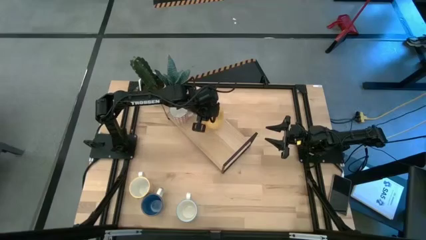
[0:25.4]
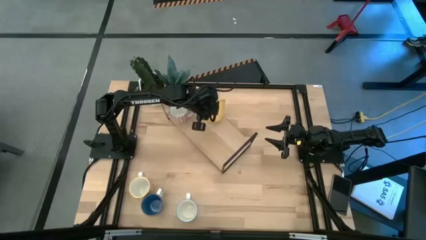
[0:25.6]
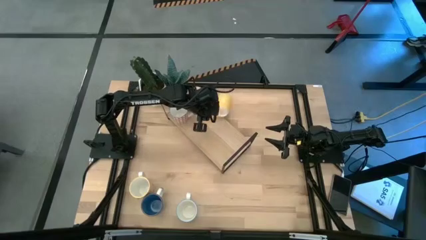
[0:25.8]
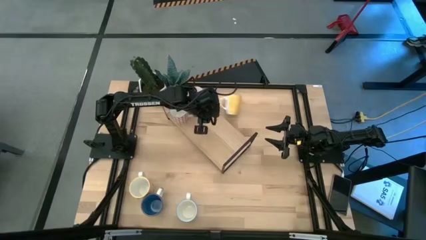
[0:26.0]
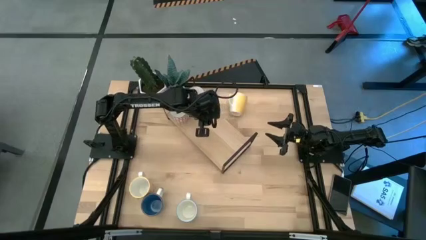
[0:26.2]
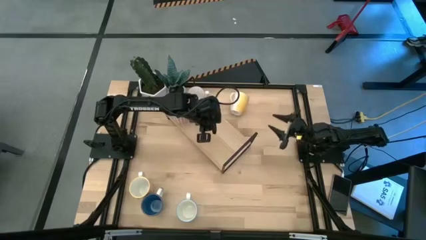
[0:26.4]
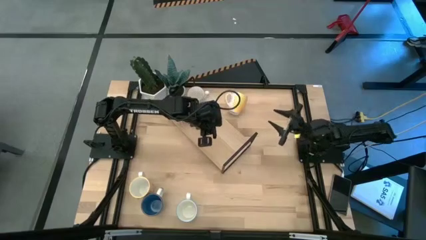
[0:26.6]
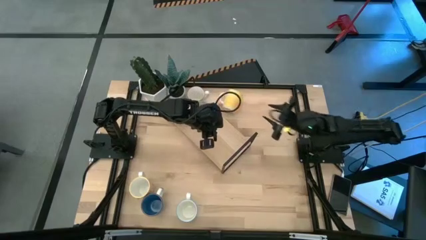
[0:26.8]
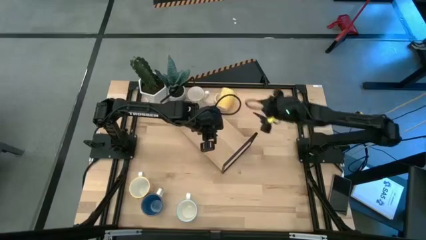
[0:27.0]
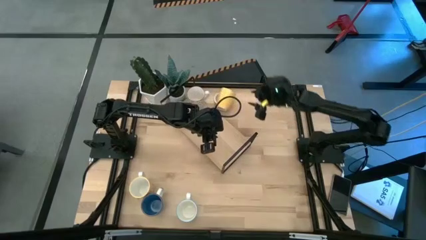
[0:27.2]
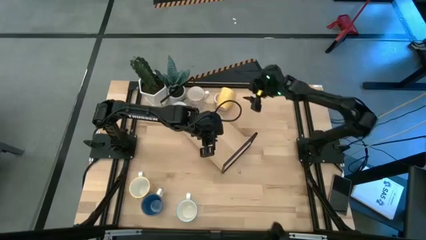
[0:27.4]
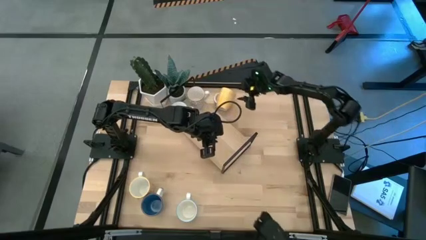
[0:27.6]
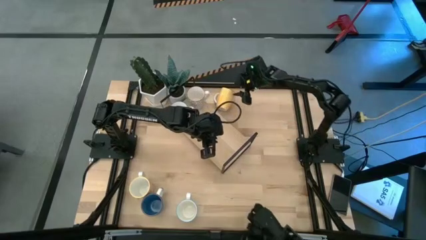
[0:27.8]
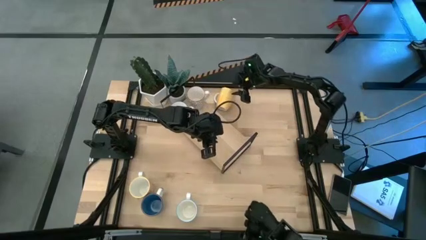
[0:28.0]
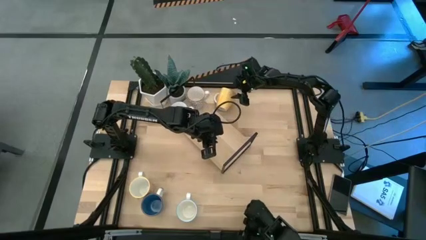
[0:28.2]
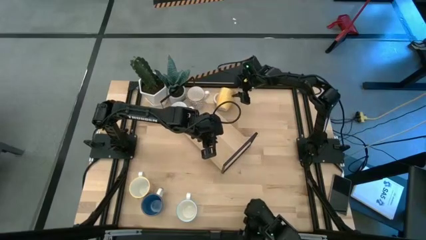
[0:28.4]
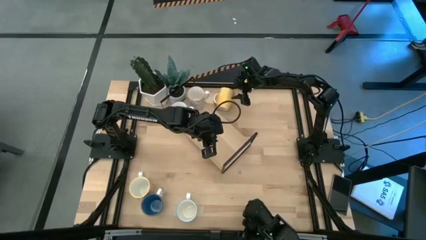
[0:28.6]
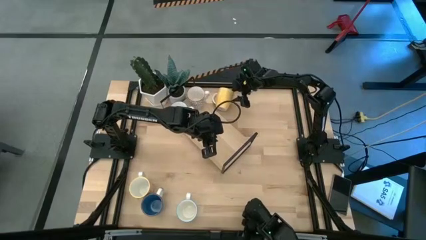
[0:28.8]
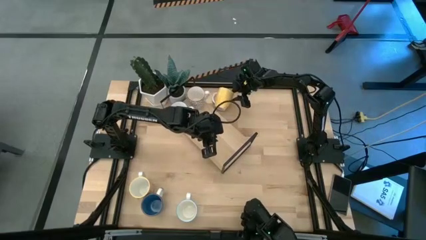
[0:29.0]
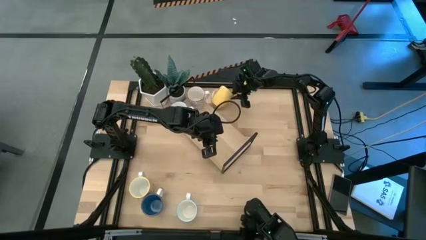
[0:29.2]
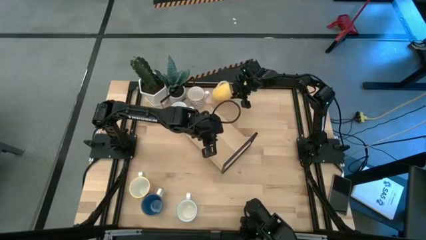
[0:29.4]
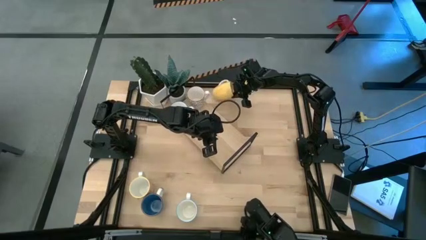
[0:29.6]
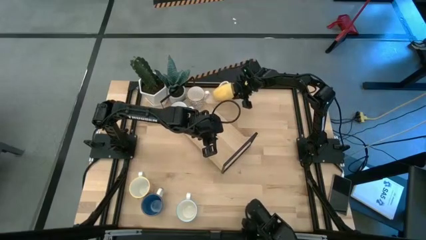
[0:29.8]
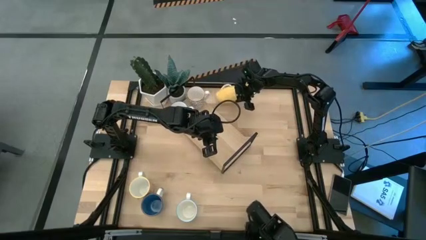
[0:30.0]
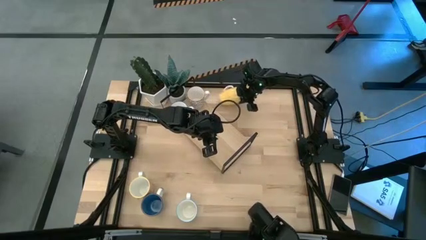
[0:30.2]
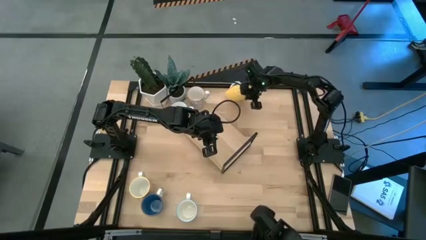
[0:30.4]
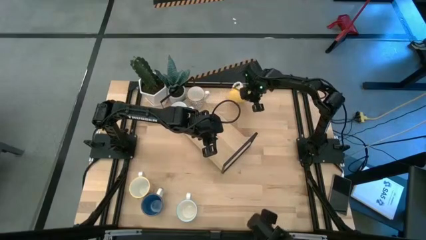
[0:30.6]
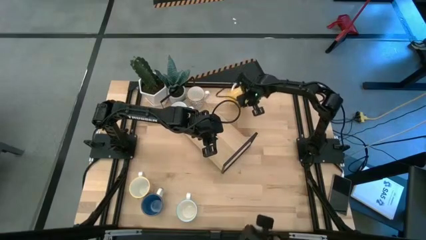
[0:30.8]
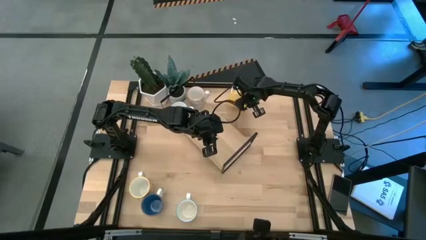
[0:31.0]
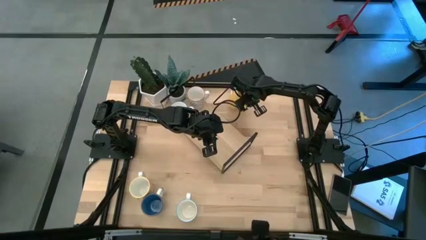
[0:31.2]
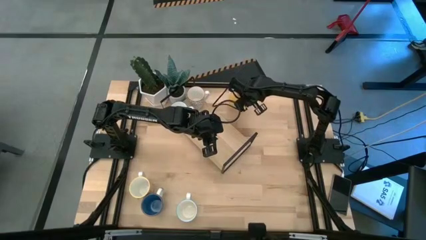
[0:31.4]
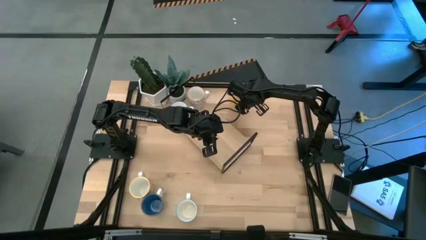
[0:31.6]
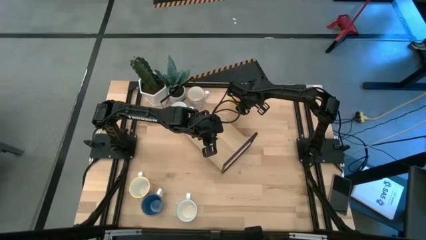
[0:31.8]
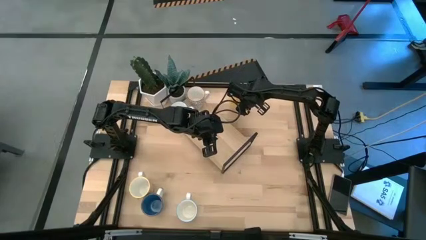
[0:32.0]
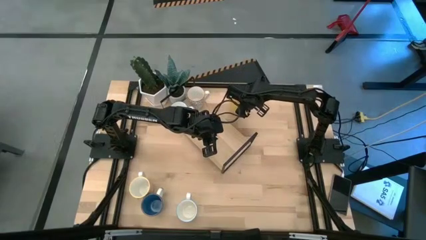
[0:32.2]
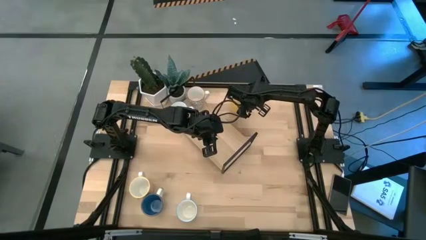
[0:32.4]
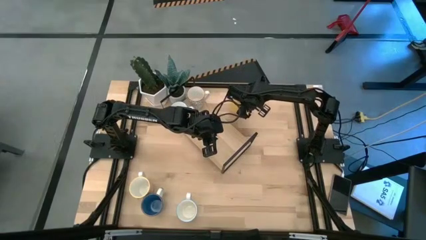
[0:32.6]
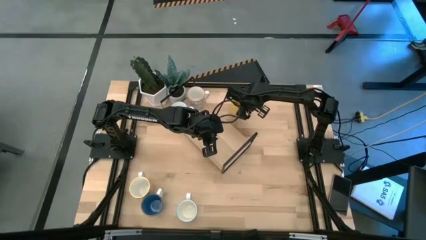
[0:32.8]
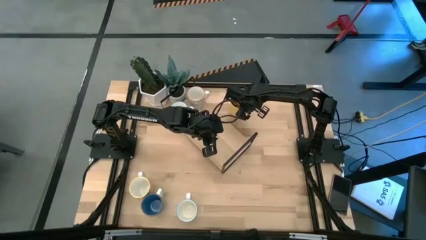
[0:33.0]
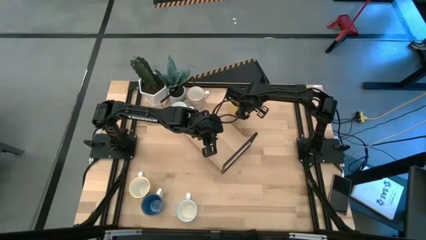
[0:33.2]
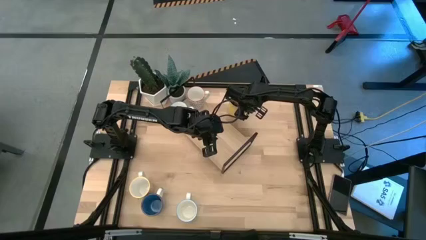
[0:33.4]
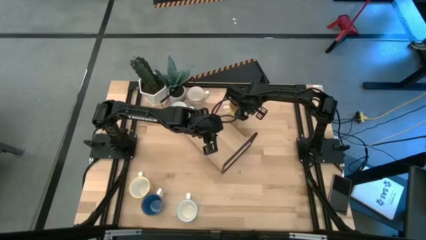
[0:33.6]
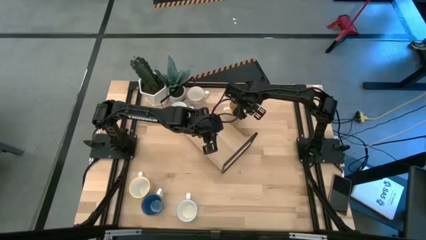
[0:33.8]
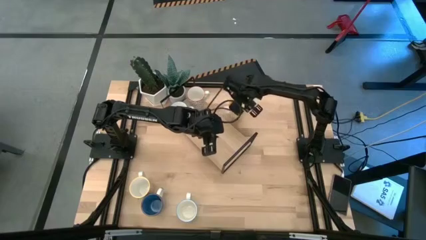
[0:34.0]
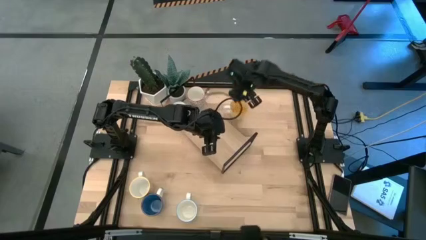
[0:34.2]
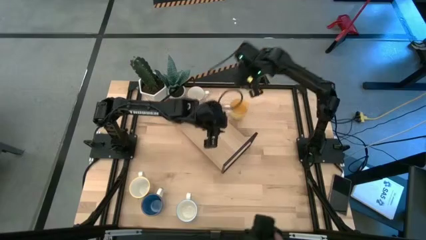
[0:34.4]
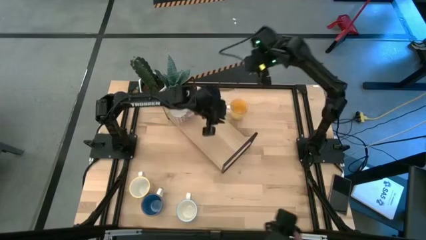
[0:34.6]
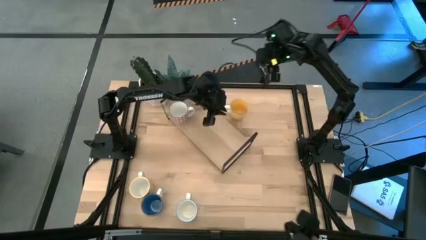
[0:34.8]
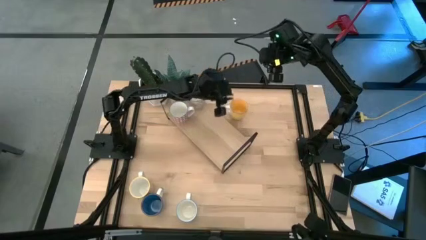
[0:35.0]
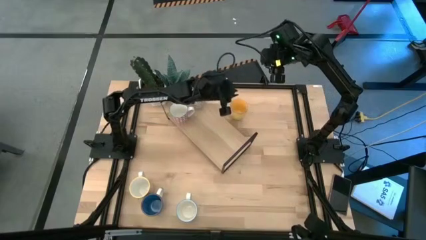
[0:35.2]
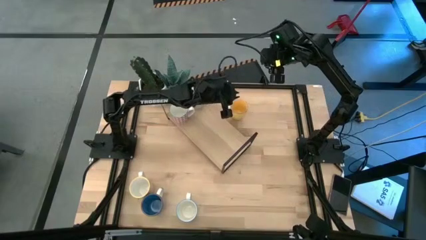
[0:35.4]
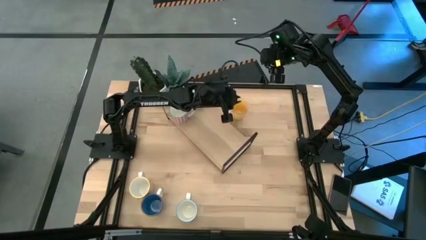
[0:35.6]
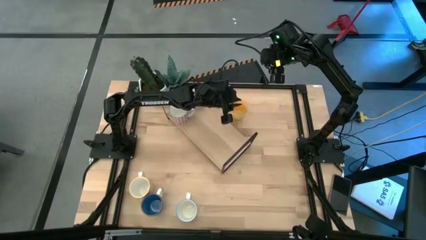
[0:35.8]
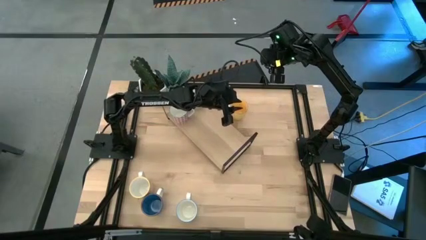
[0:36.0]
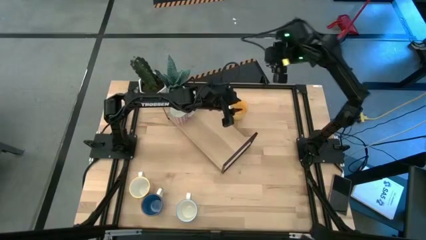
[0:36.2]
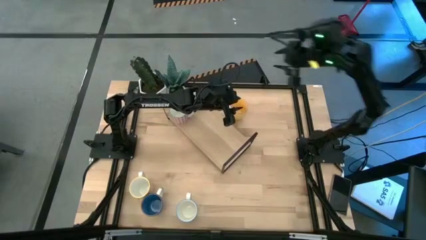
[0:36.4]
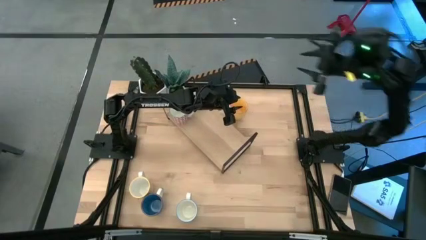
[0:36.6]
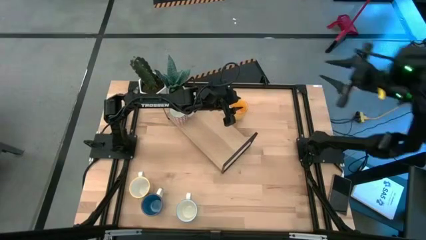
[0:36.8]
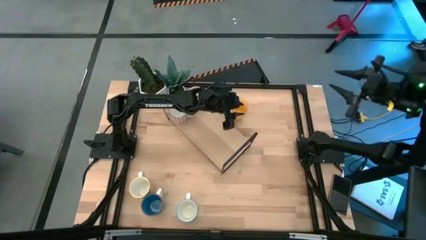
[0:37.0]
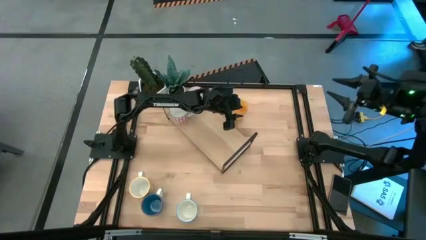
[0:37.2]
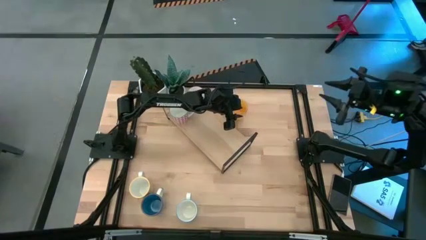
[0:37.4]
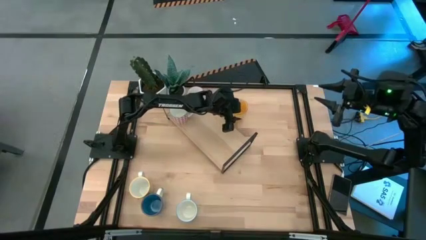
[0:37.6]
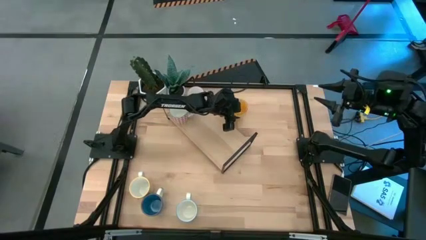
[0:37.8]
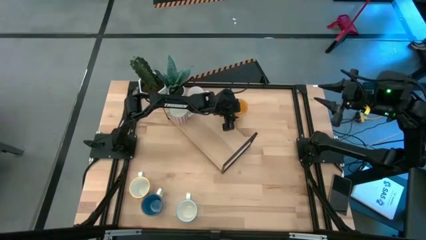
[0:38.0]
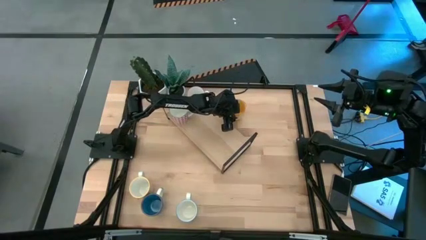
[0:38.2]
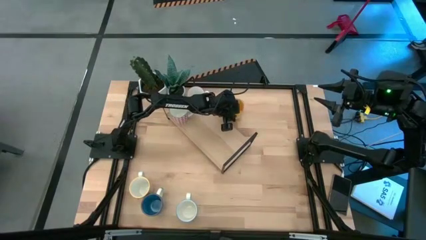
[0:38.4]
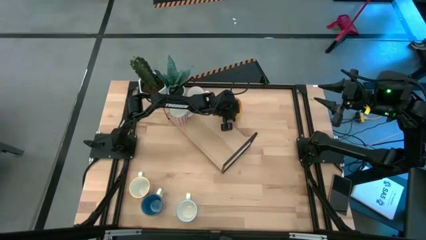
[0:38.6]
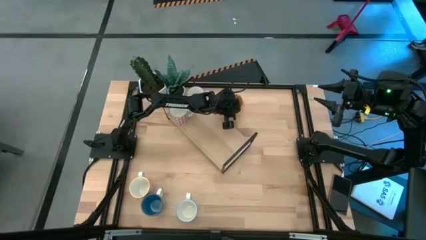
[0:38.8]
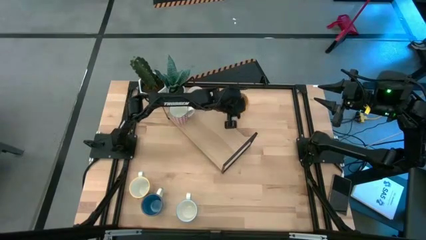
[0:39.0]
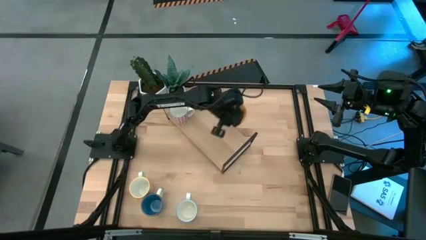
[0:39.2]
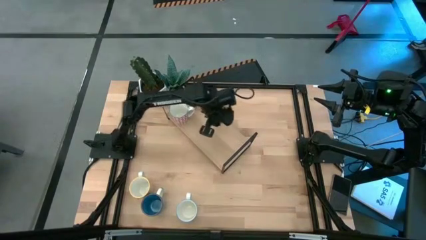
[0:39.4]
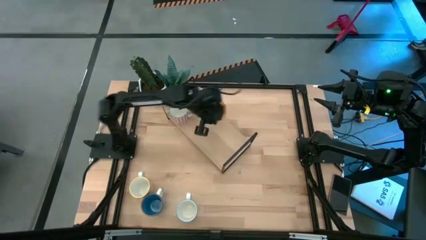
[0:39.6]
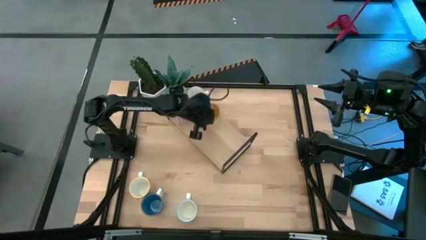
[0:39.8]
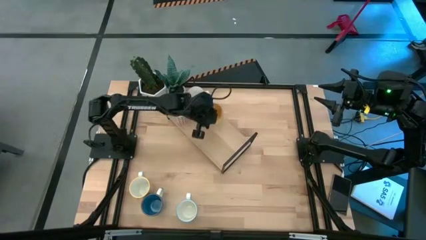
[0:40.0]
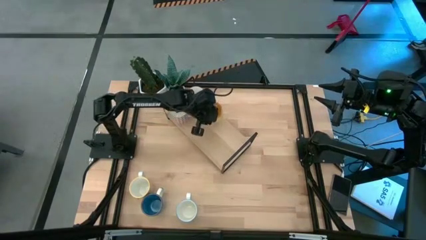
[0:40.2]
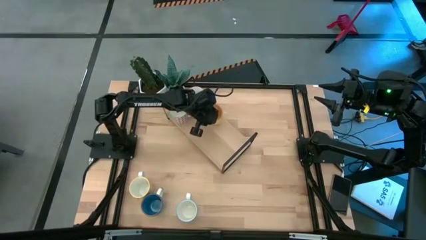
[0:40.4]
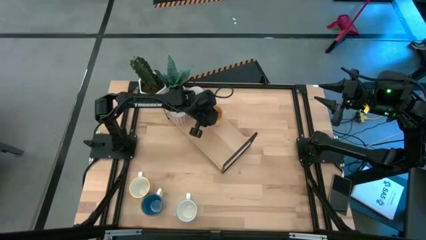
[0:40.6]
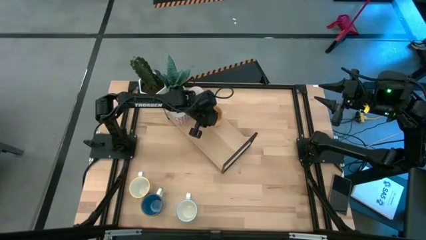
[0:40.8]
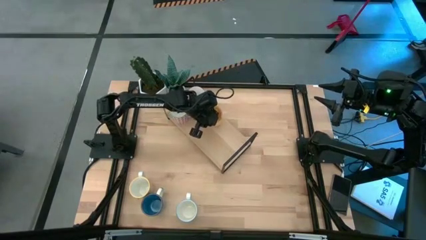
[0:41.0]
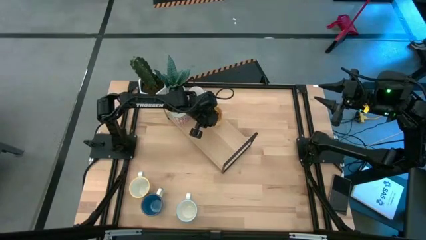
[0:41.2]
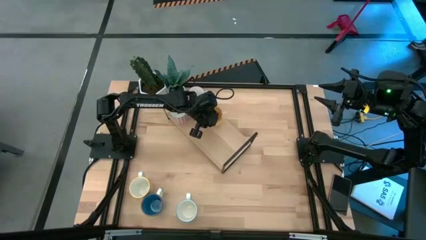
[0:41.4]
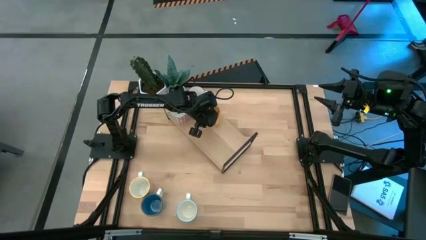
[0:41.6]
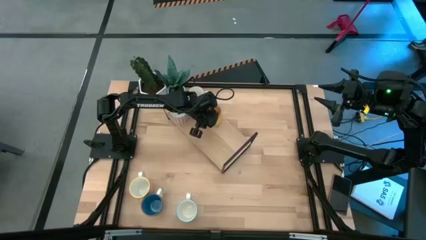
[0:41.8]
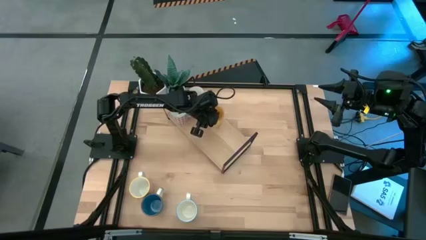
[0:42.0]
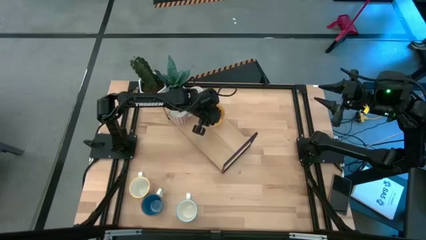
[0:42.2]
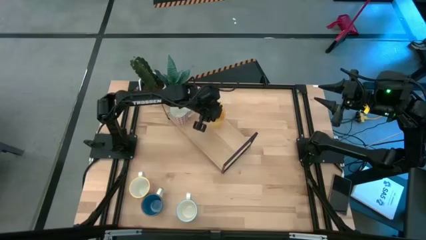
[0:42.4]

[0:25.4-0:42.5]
Task: Place coffee mugs
Put the yellow mug on the shelf
